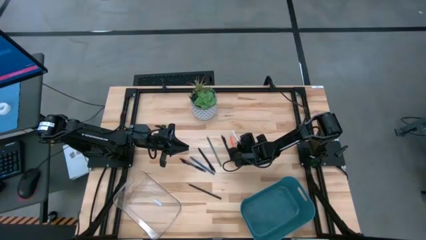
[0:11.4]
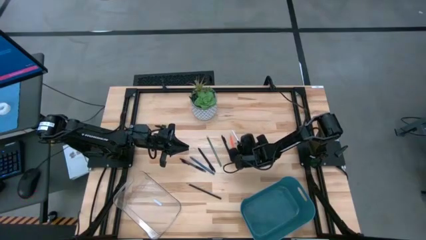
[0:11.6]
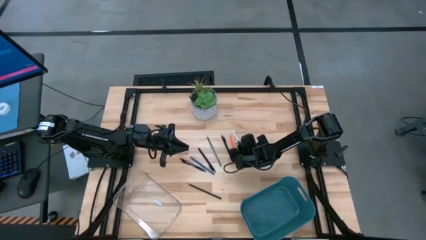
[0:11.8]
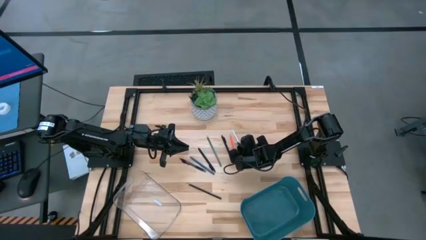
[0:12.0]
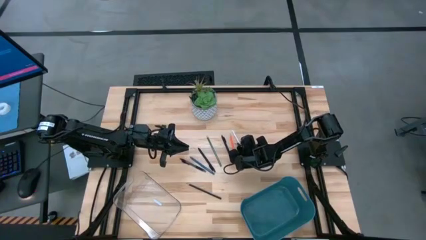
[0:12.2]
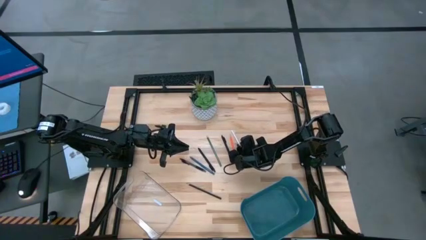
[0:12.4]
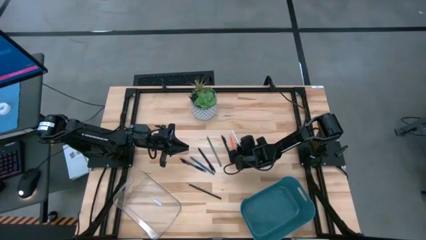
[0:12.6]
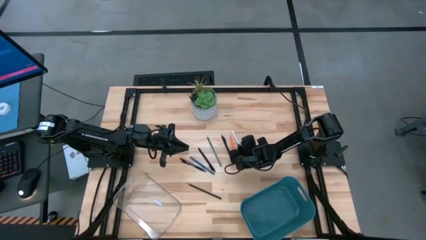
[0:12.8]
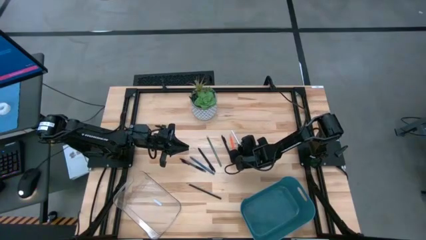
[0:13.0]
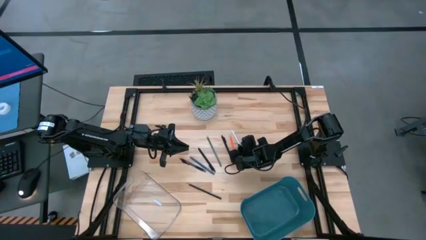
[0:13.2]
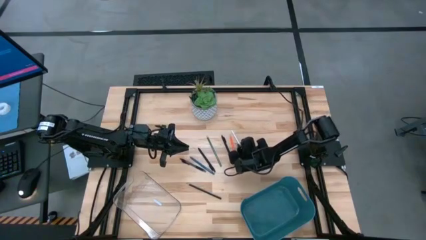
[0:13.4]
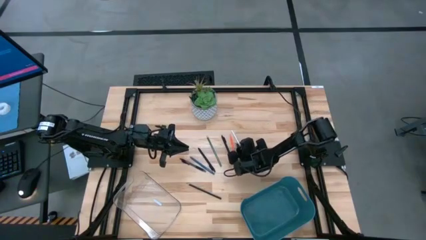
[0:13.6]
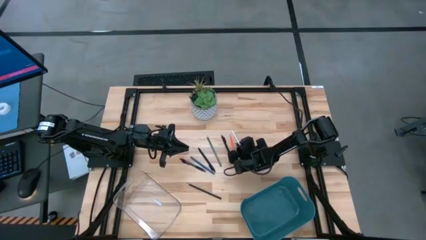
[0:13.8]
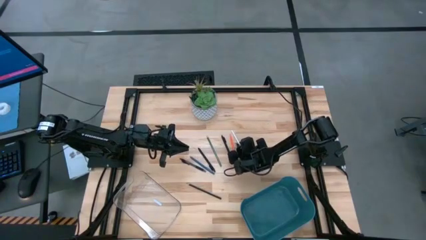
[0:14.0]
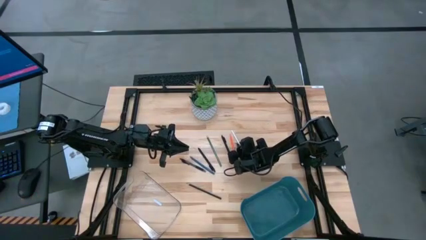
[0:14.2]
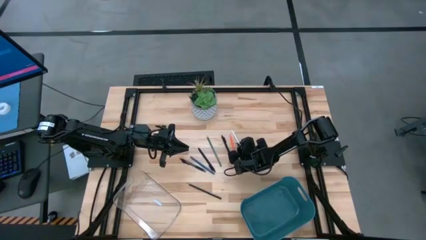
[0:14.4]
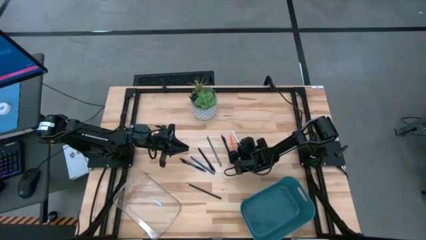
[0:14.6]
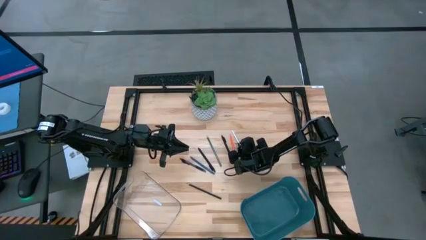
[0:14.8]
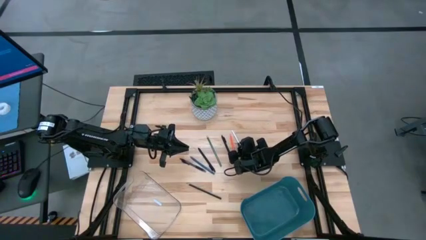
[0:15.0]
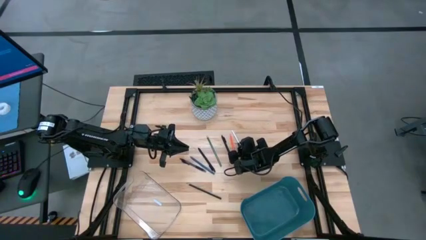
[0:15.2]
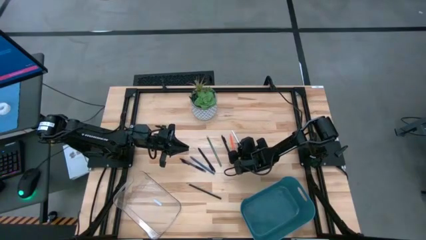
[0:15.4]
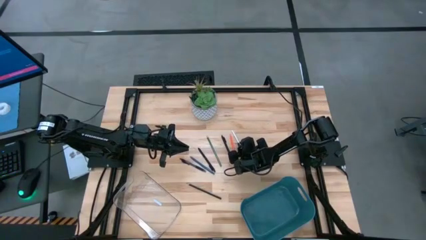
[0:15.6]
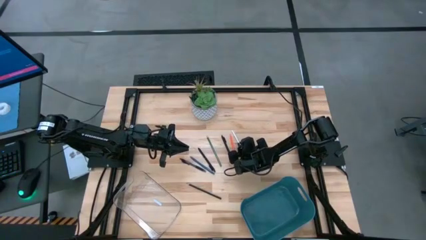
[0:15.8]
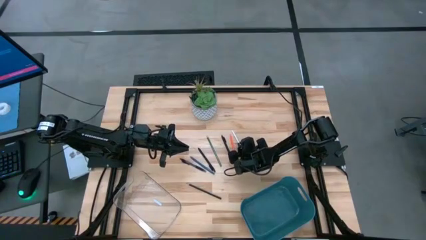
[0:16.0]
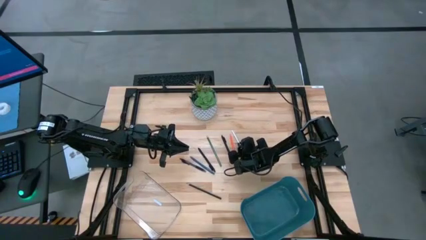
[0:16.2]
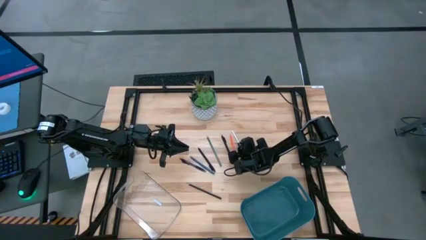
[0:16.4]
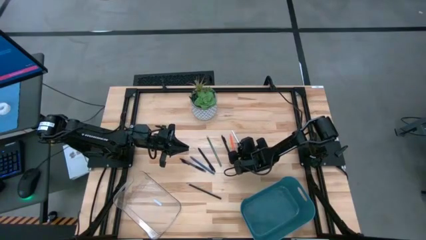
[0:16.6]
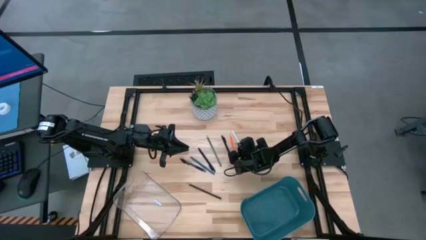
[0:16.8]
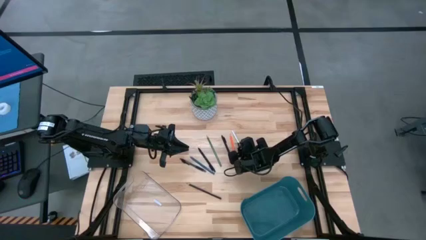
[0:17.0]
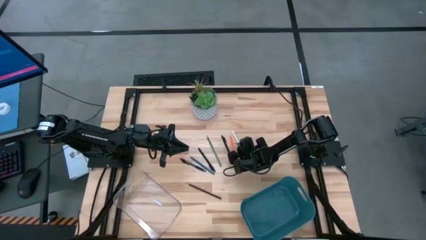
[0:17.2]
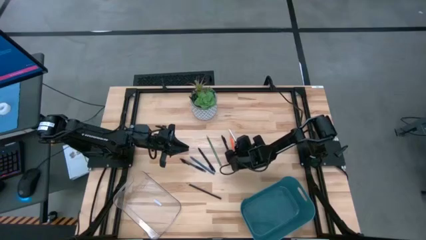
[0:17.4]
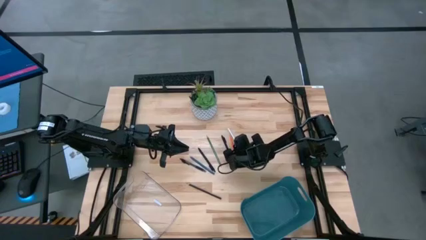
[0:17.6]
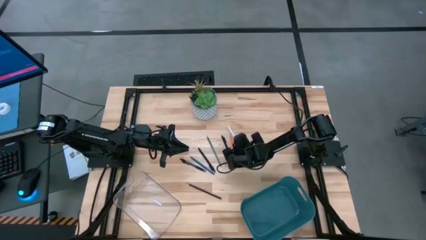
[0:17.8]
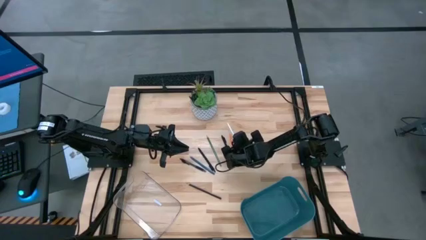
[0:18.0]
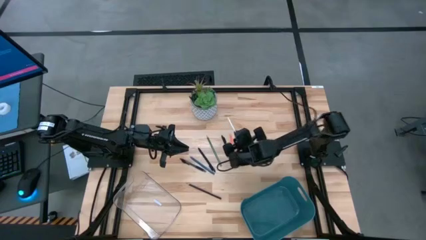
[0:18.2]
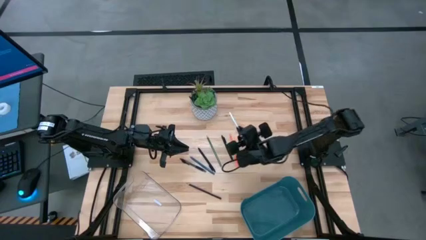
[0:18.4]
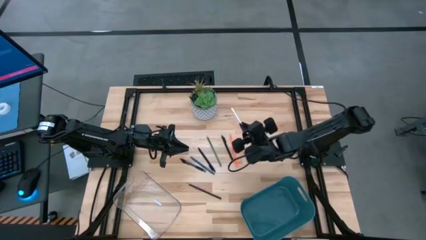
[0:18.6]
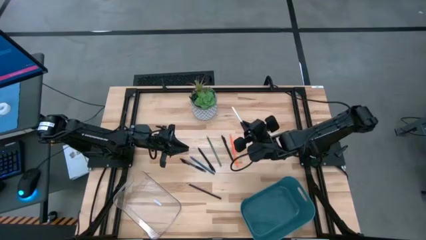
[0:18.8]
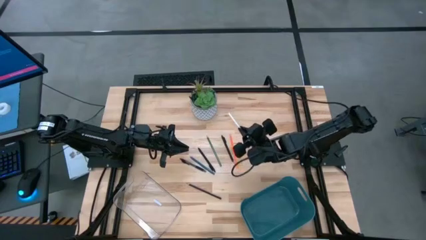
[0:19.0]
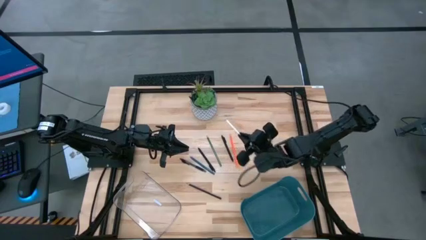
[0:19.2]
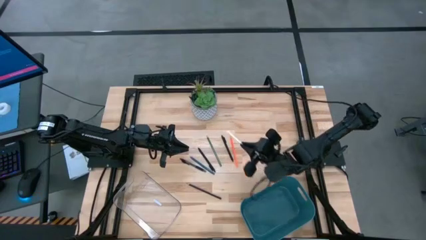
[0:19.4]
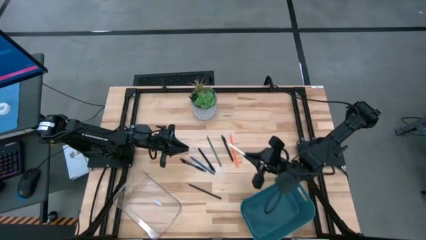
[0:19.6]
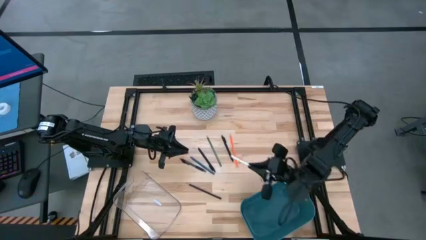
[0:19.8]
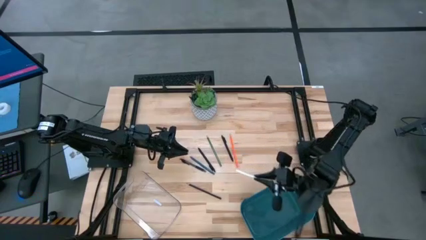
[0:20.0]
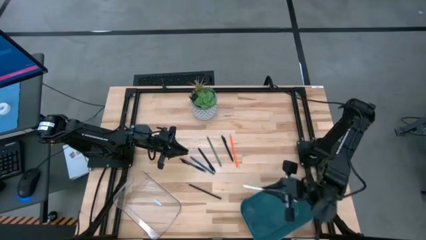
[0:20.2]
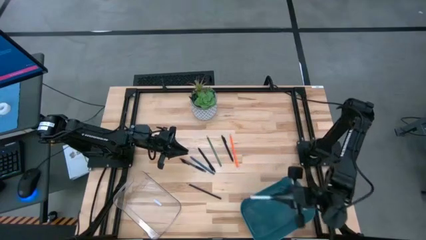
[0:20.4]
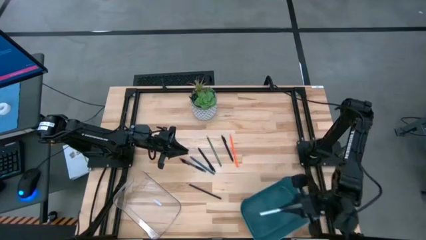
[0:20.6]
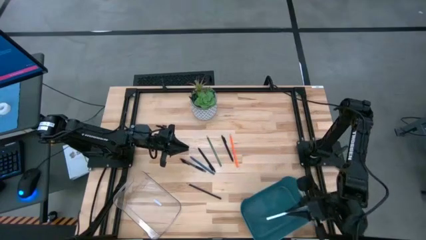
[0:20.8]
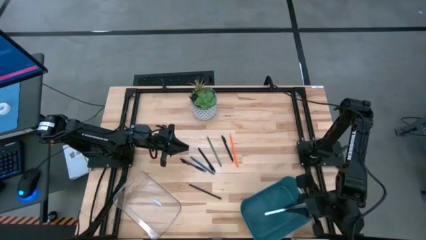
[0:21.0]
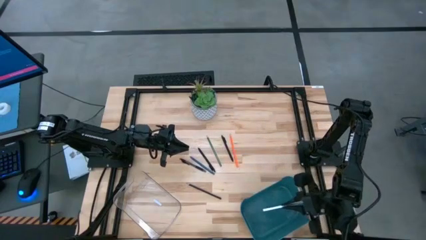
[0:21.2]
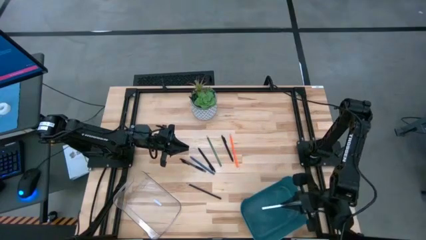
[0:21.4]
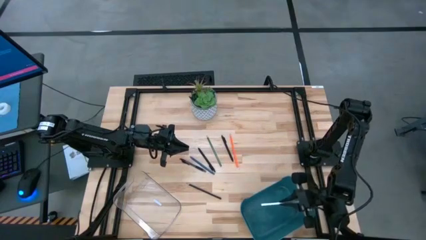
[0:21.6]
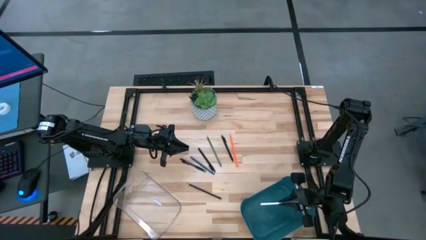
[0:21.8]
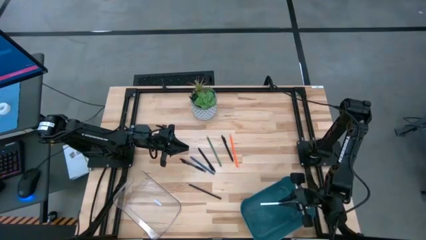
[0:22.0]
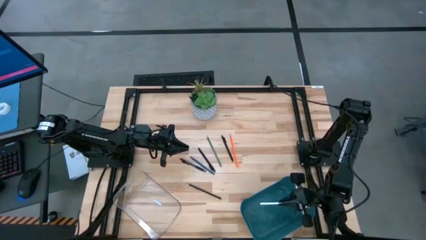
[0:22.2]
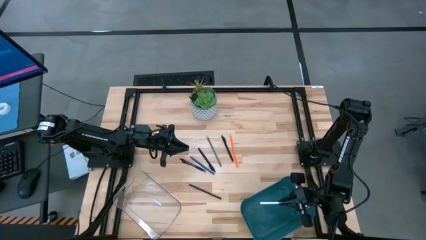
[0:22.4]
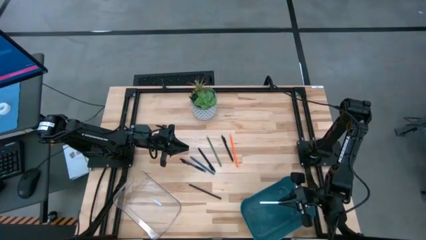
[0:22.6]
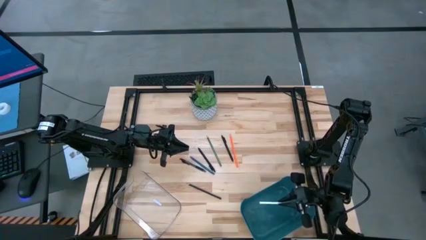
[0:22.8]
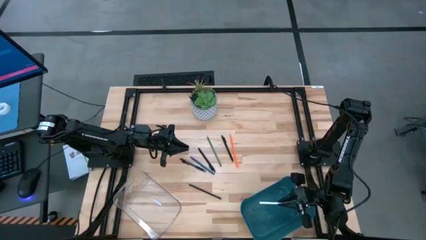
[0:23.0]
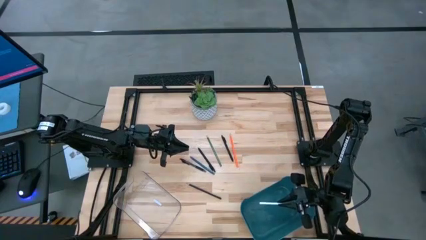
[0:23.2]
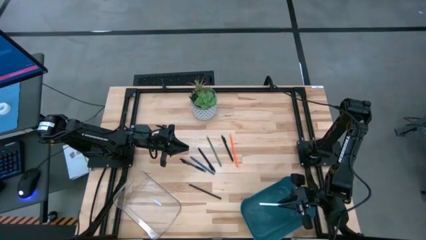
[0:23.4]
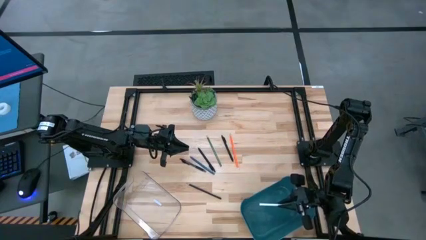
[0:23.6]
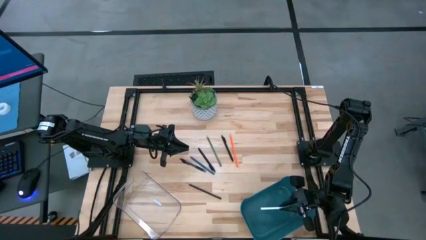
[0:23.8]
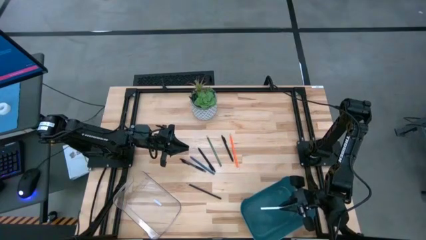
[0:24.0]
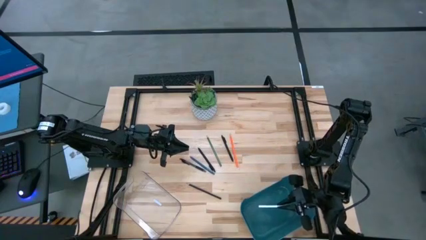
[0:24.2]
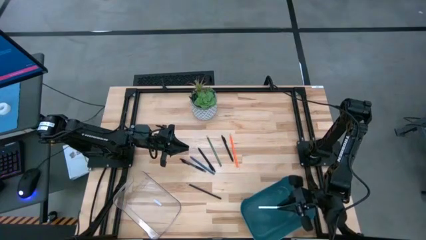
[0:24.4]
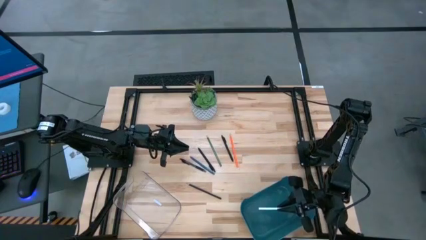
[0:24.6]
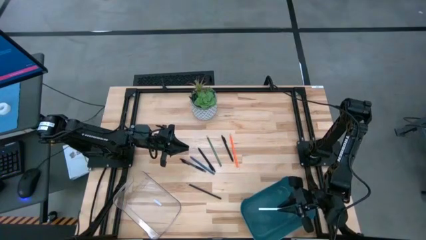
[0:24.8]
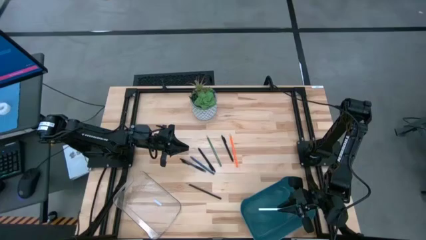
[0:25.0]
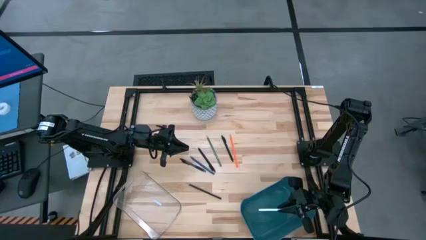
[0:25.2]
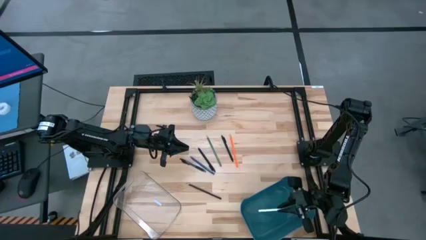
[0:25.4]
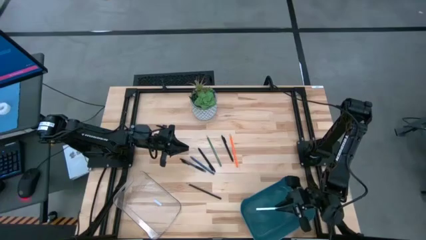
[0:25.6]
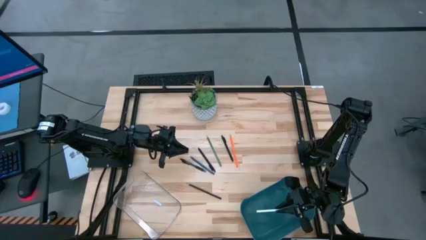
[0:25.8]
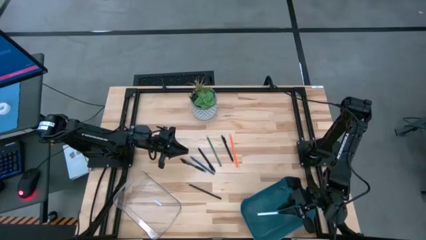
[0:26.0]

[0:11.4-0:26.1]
Task: Sort pens & pencils
Put the white pencil into the blue bin
